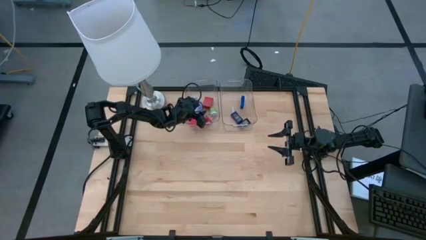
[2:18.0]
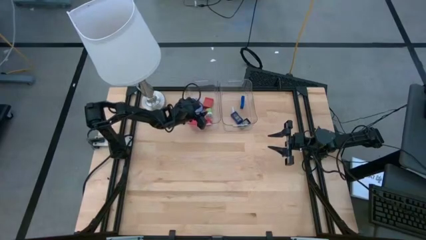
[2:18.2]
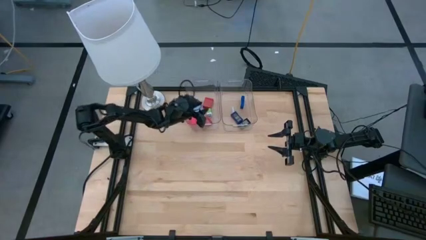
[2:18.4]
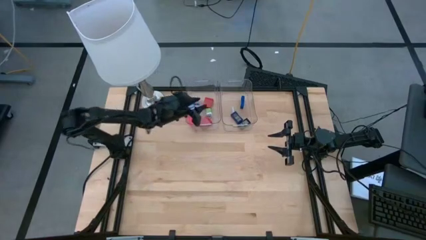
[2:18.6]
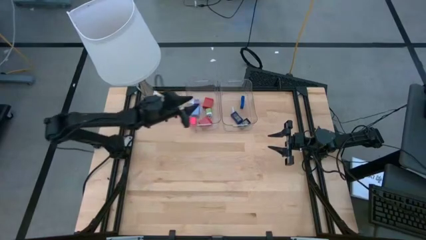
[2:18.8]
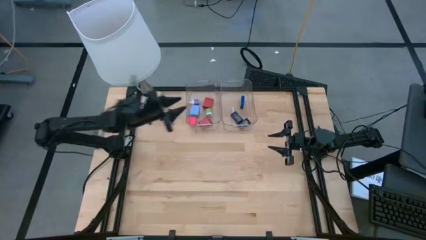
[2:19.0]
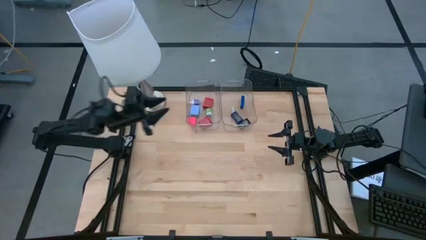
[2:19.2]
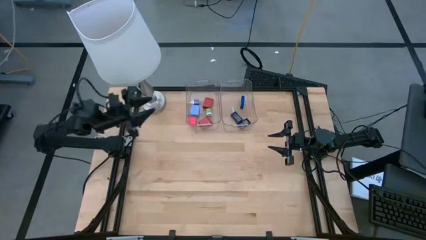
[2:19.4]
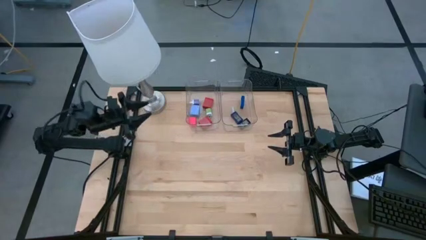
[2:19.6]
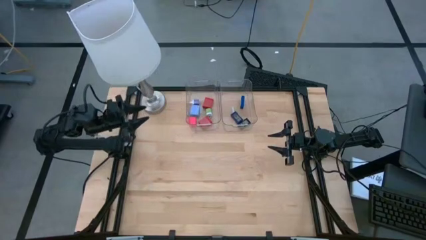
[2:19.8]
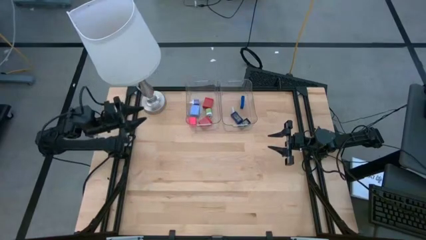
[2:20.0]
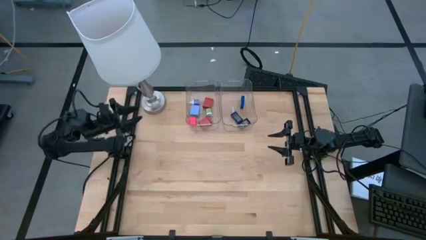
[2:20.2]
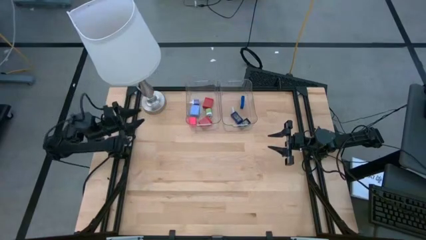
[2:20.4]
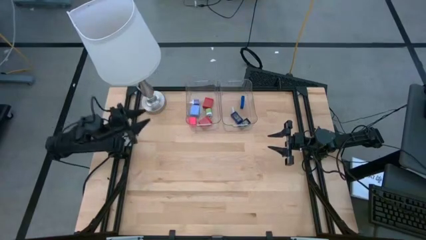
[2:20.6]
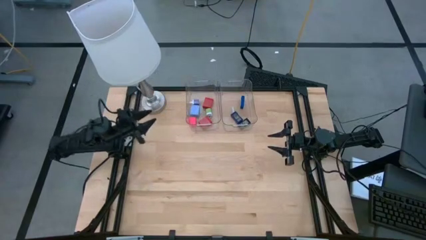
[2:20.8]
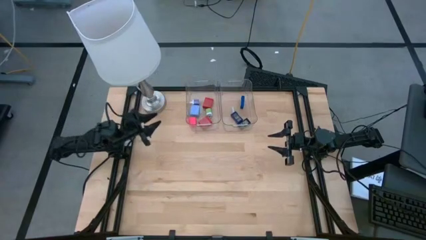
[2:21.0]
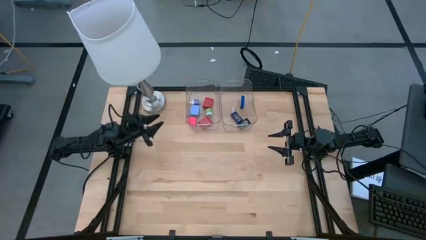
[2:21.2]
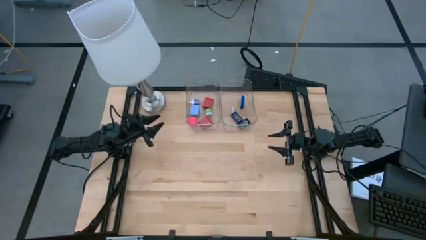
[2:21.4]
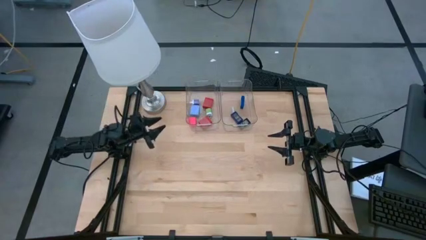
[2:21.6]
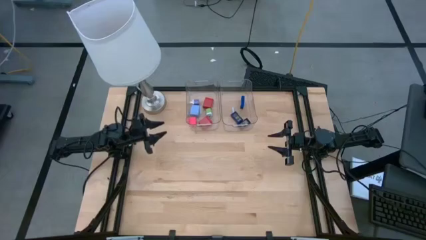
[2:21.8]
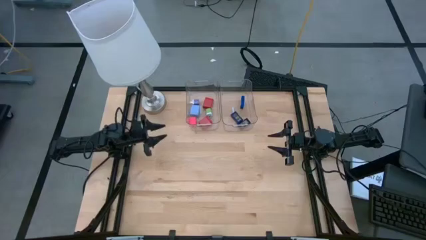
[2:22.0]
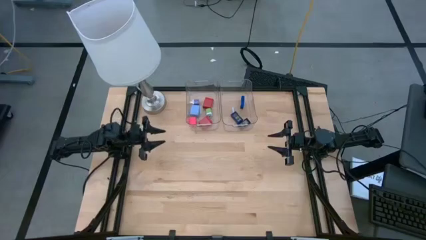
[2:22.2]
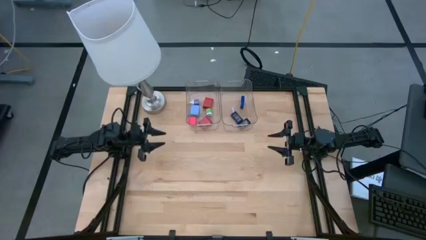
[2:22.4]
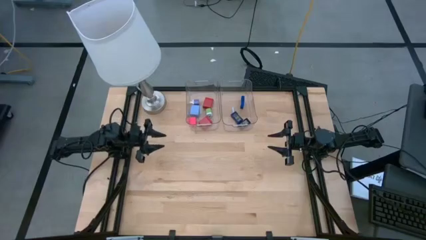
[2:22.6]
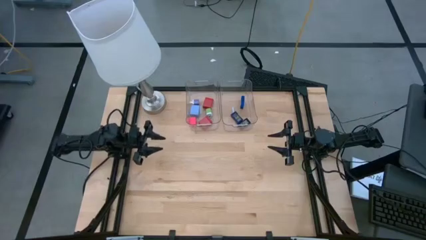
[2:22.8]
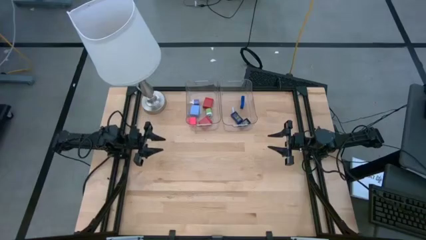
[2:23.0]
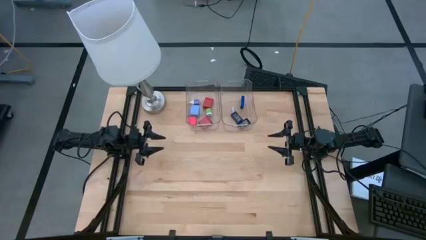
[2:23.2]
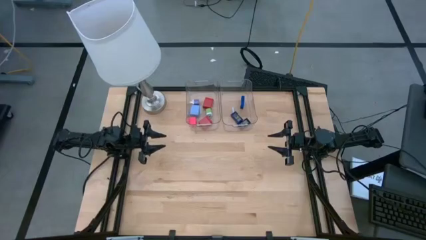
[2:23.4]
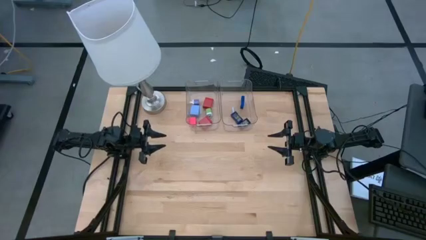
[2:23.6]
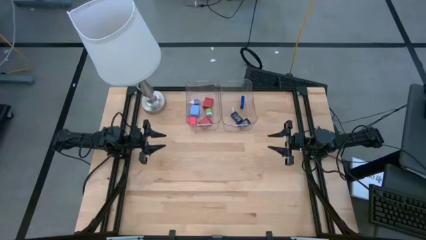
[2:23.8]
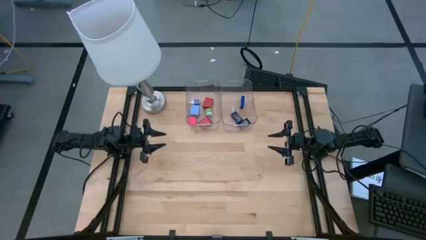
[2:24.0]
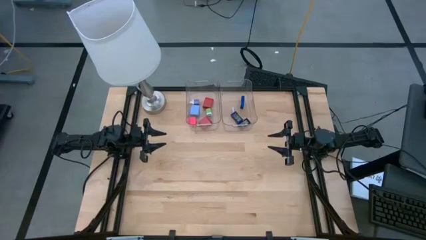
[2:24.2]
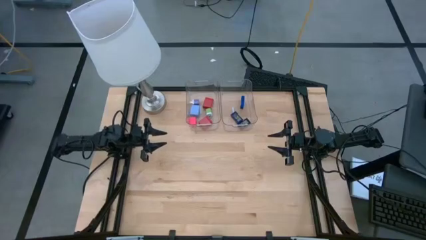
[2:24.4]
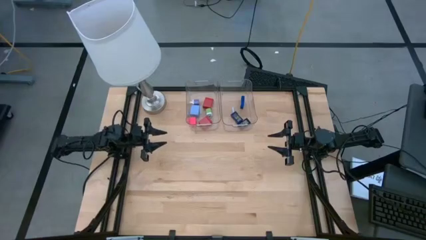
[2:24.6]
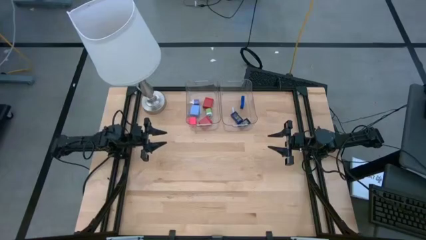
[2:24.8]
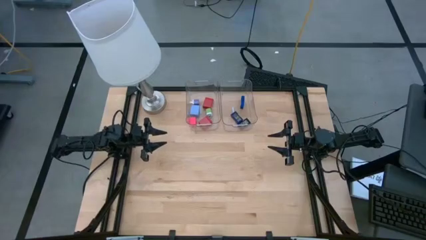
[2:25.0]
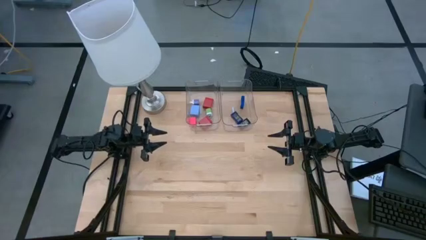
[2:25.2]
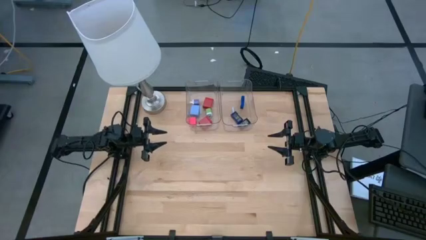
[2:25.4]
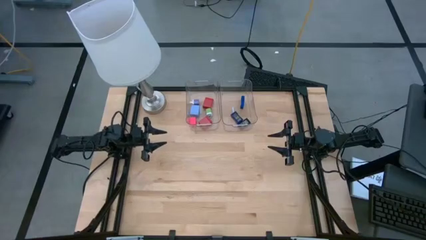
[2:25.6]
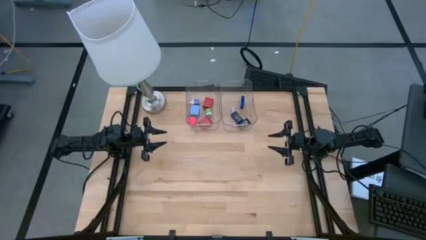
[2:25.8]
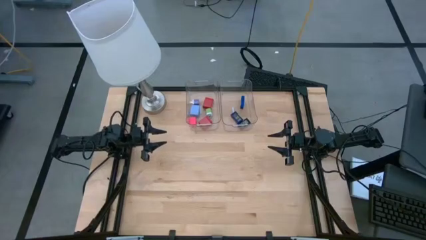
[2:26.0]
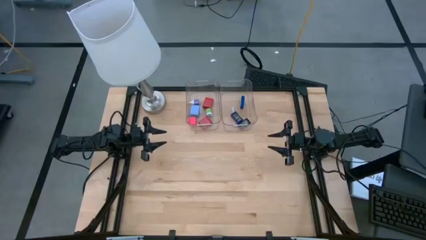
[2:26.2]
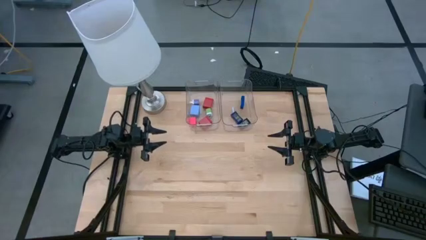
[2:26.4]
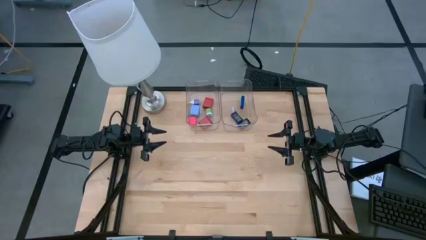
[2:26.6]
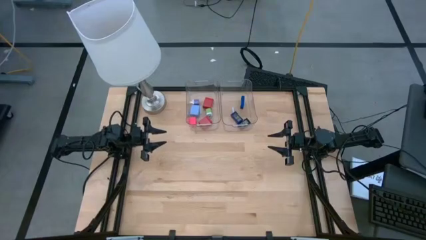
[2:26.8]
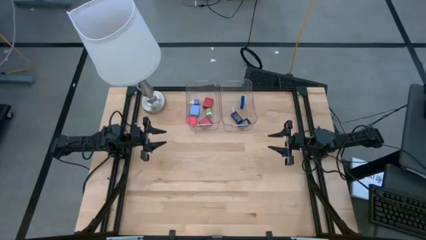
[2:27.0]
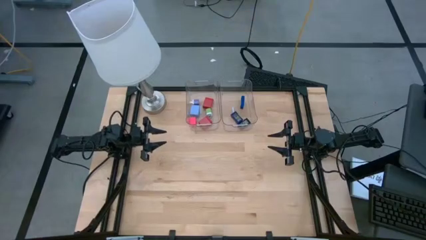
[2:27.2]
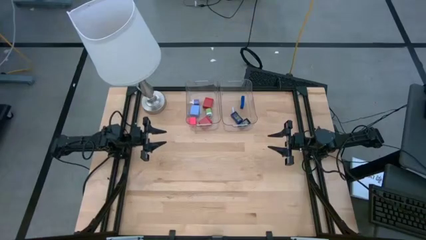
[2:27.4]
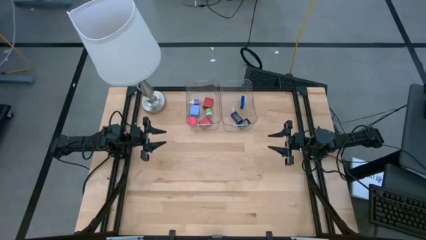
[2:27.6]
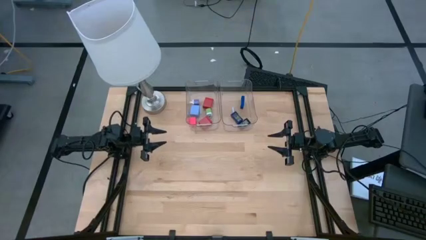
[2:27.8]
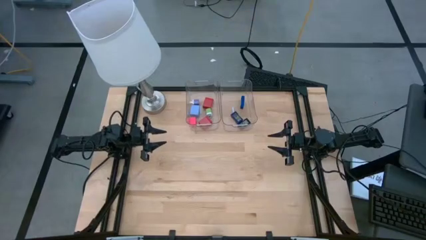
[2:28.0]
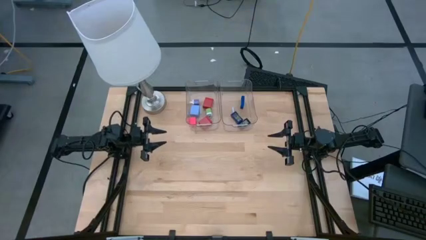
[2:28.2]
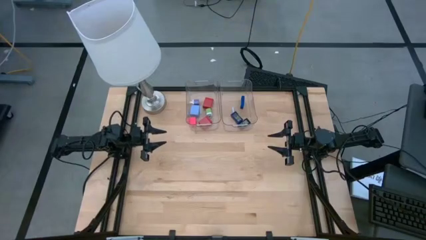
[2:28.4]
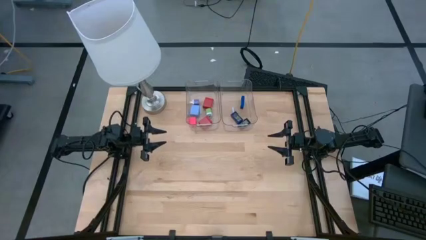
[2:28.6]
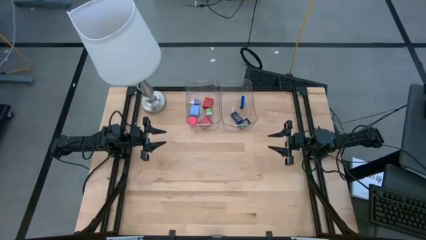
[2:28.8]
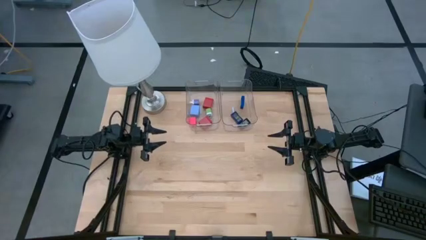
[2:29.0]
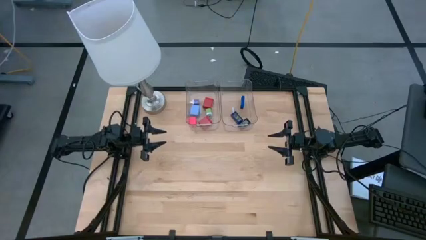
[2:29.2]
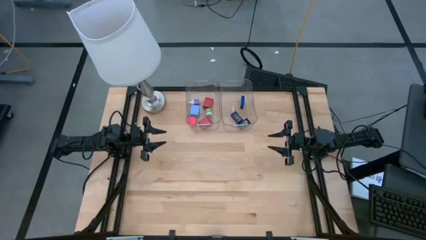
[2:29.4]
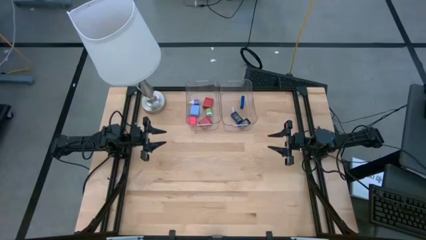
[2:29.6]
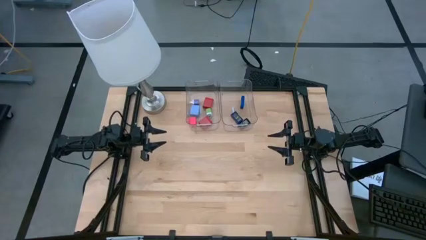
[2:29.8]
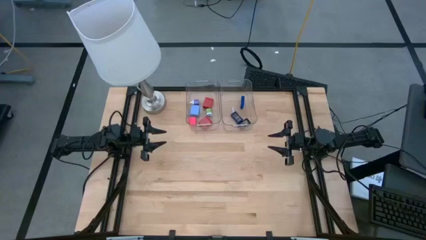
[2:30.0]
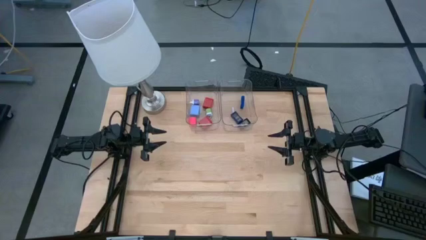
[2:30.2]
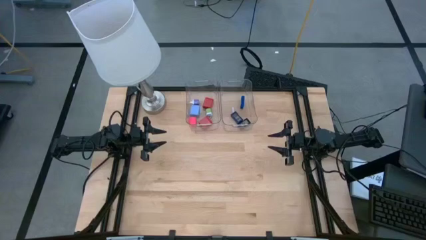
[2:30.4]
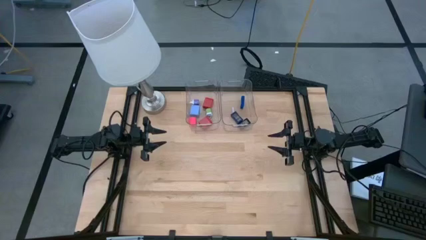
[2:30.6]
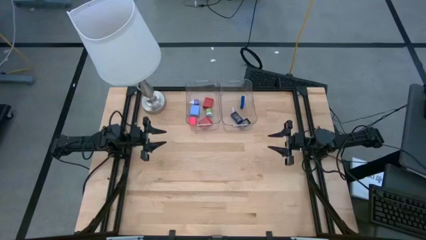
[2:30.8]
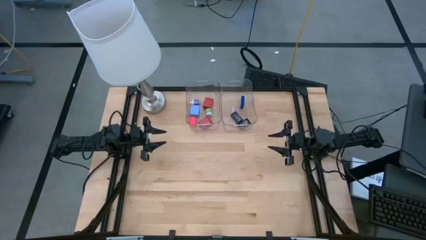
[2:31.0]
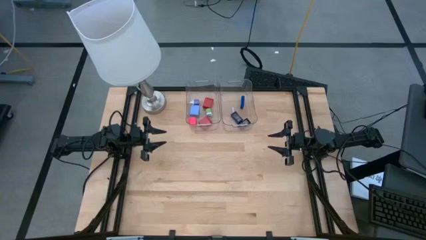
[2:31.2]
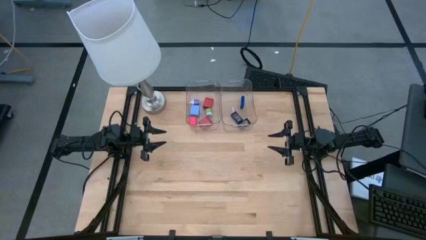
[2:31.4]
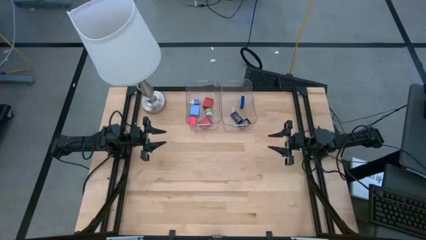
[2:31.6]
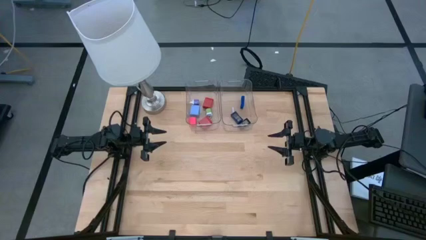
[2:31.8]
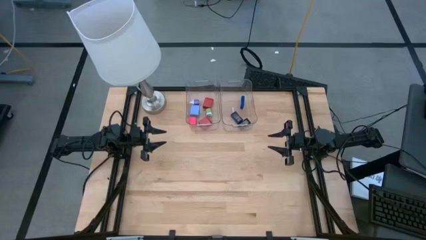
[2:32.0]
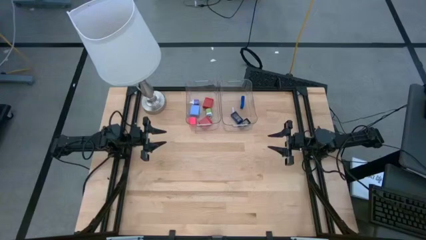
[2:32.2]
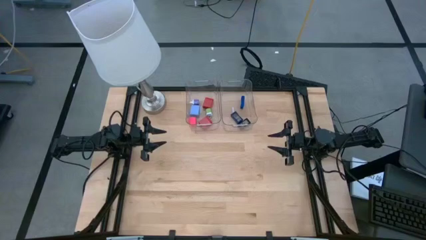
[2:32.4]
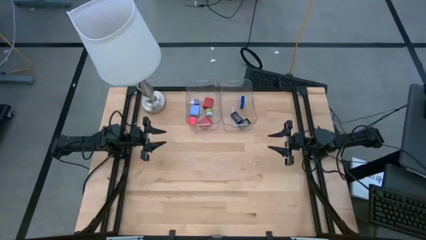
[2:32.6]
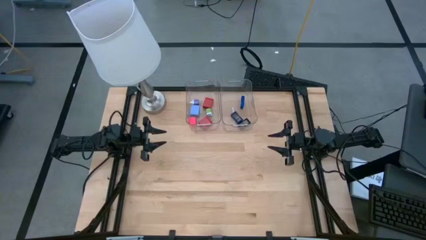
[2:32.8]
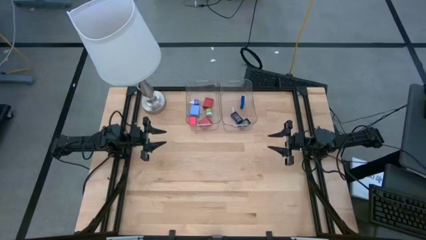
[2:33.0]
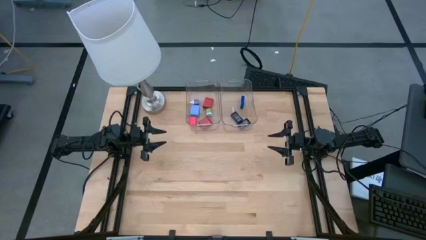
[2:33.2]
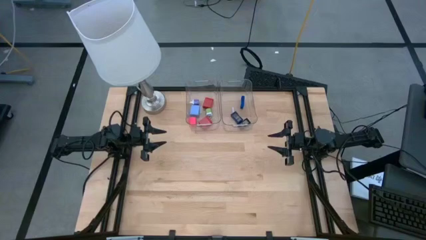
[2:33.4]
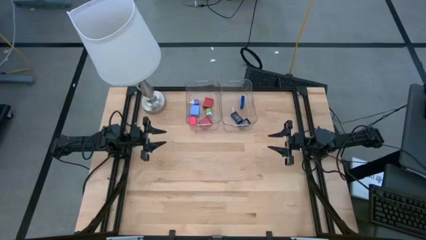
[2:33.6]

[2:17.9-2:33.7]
Task: Pick & Place Office items
Return to Home Position

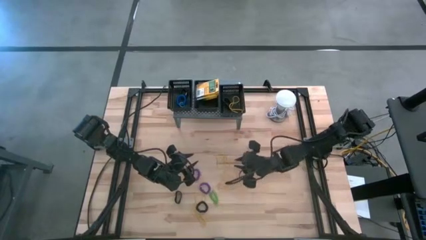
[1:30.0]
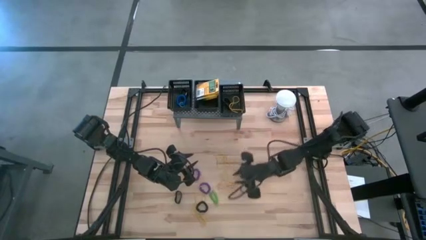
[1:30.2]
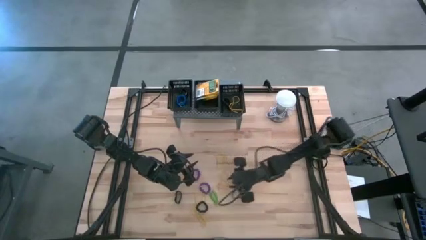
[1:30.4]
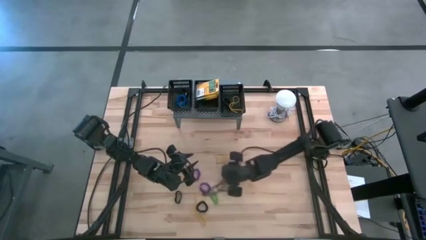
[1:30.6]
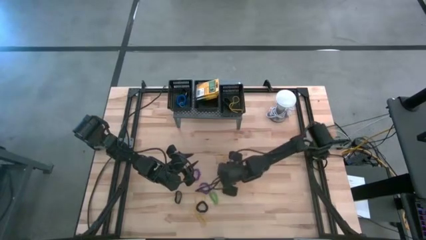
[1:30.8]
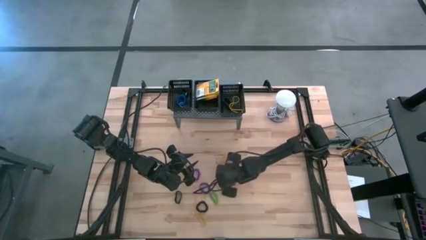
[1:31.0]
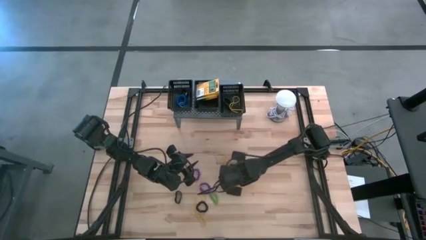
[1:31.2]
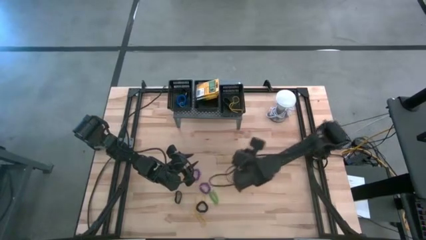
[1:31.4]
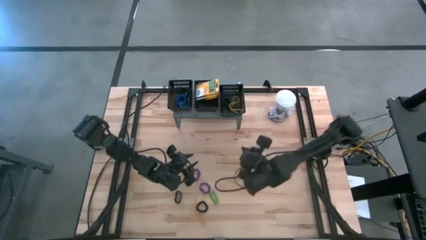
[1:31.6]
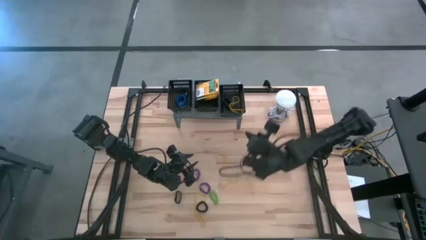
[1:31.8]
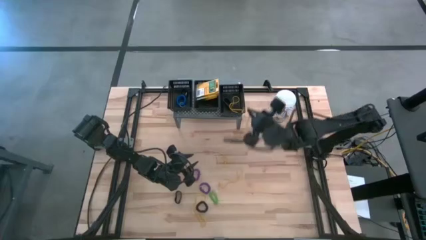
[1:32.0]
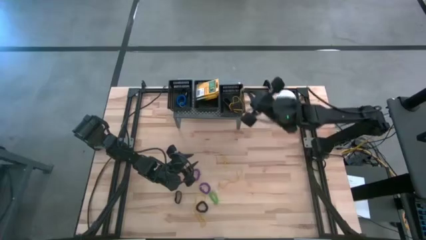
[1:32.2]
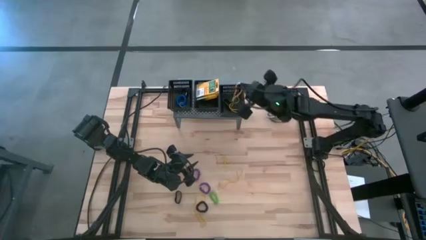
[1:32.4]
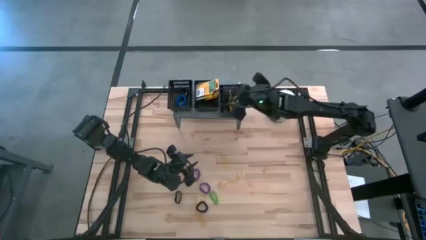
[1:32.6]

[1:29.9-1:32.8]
Task: Pick & Place Office Desk Supplies
Put the yellow rubber band into the right black bin on the shelf
